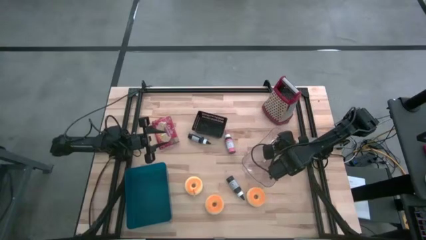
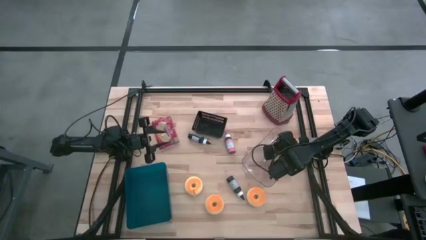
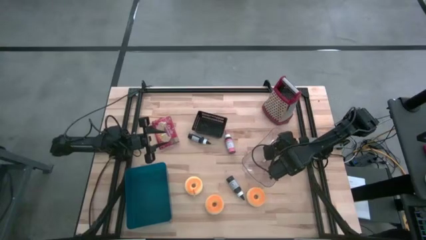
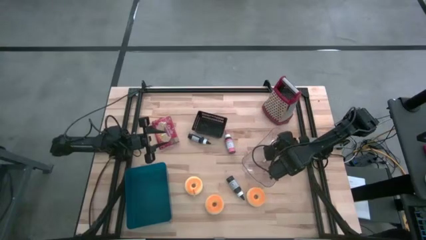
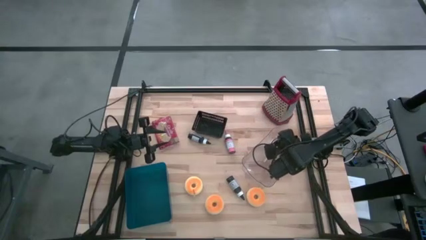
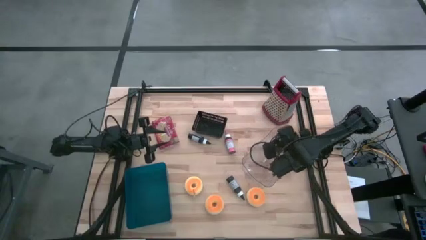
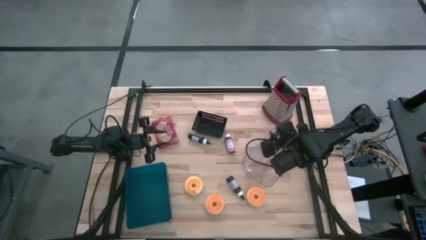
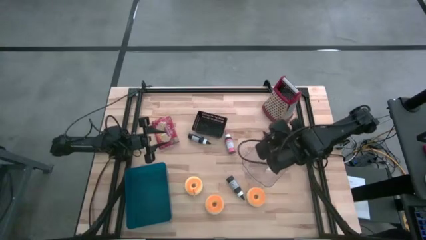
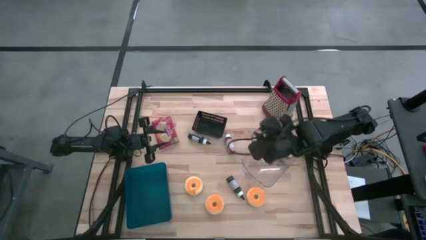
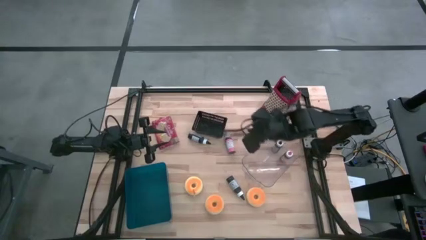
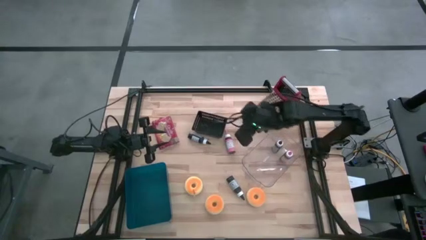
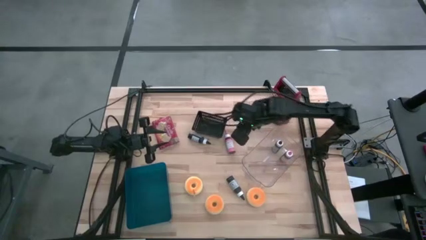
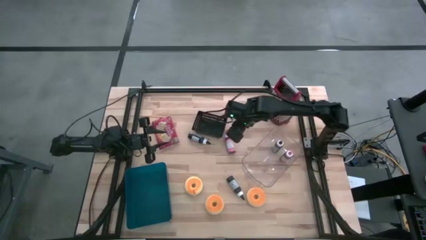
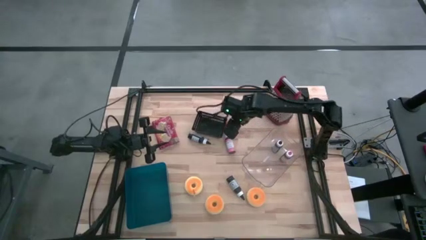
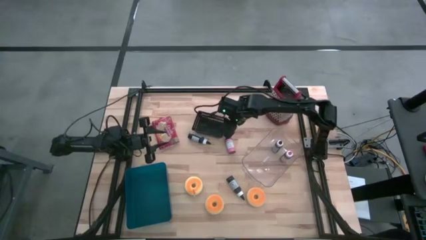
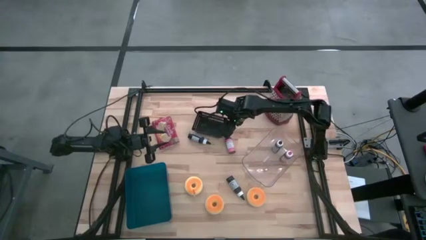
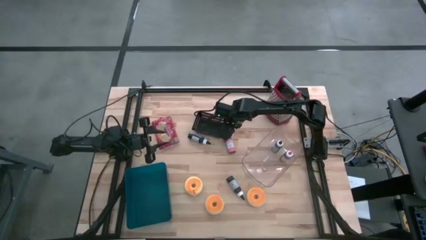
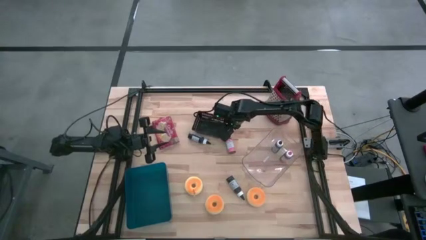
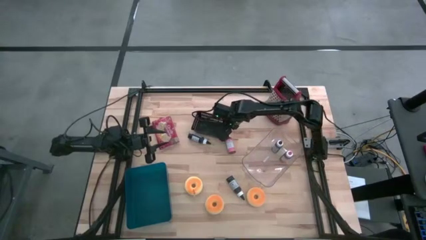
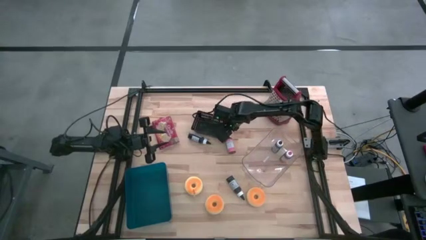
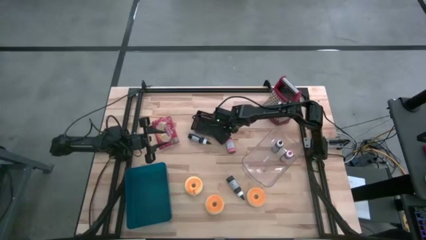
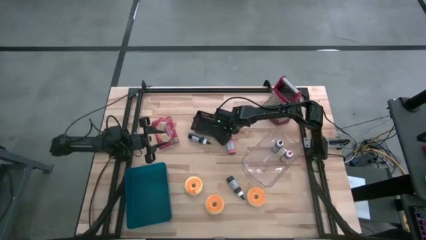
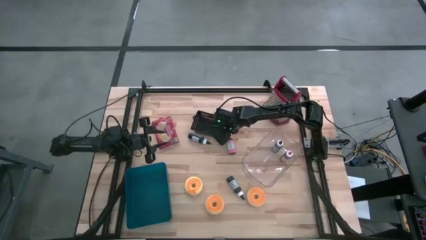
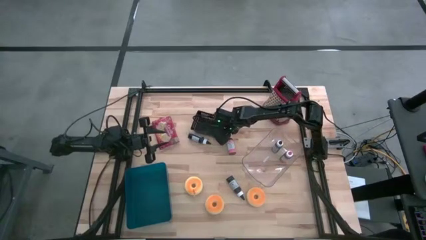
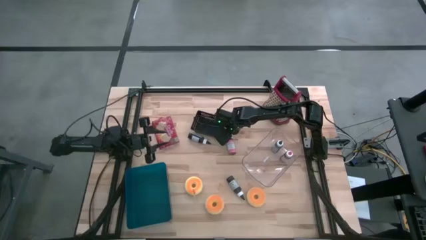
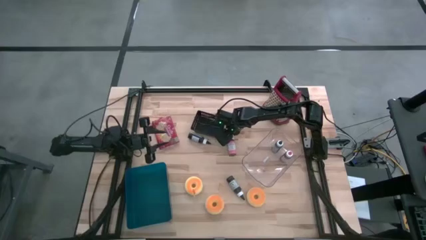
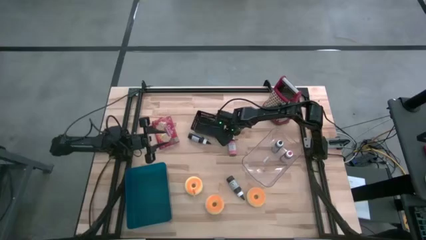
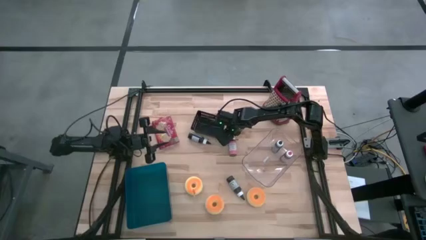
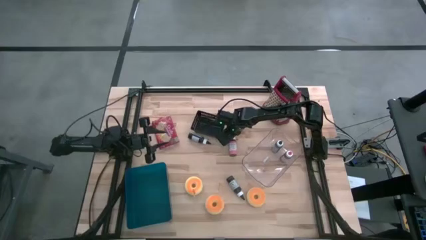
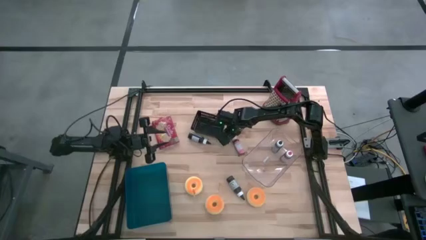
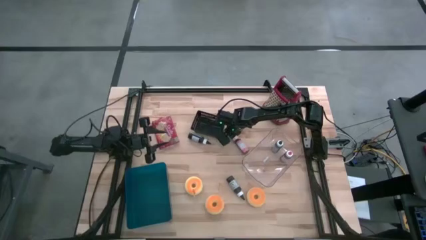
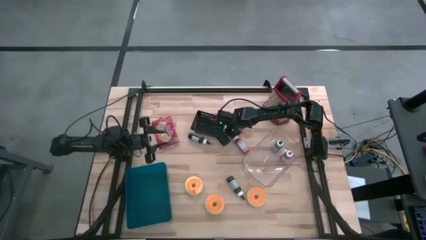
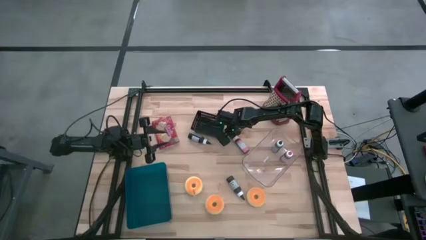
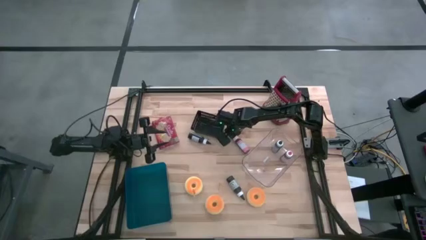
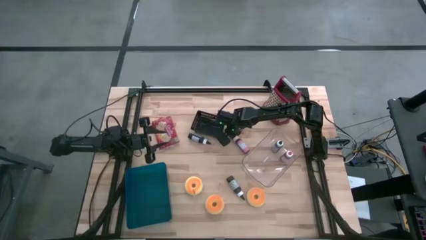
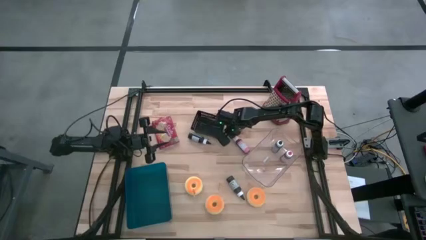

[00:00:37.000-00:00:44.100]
Task: Pick & Place Food Item
Put the pink food coloring bottle into the transparent bin

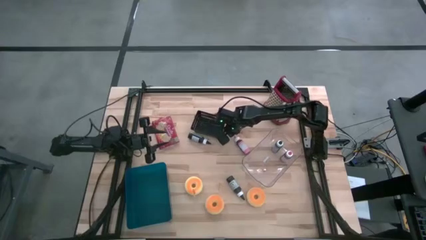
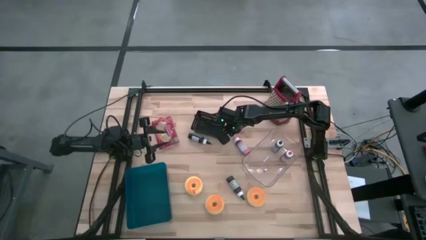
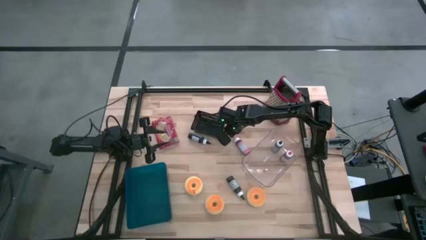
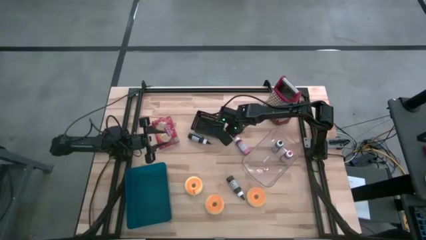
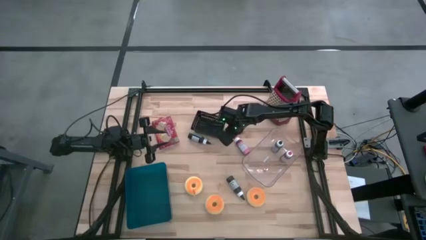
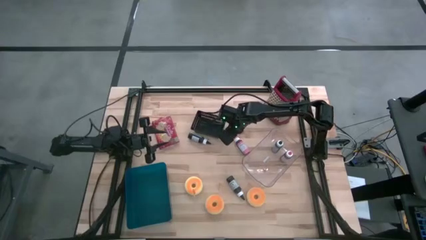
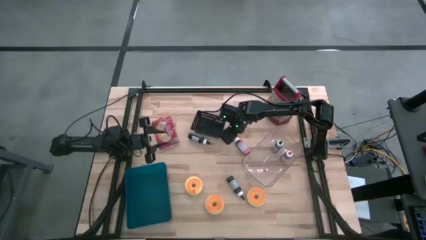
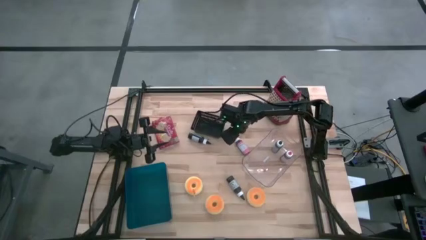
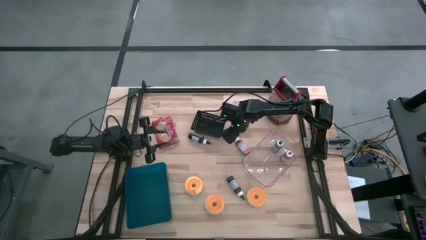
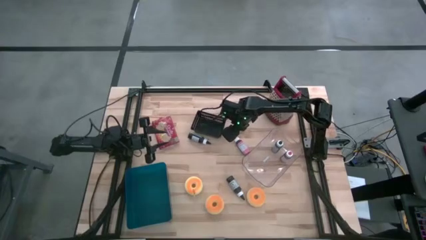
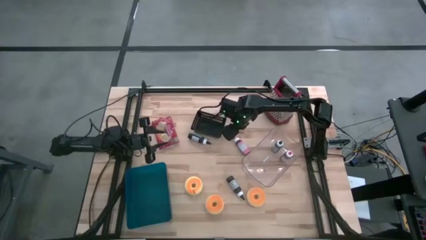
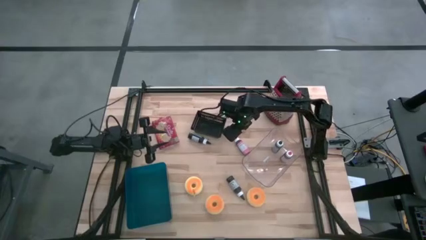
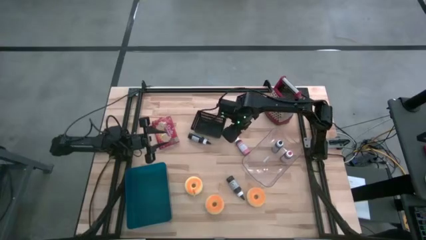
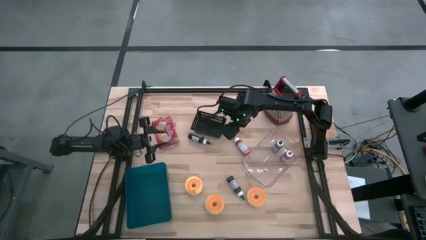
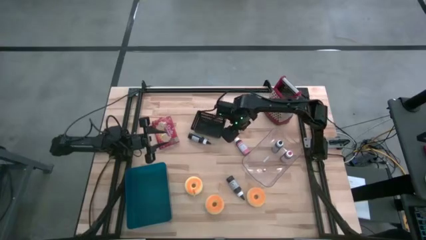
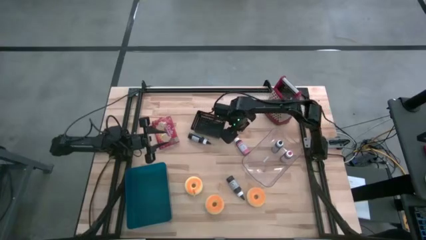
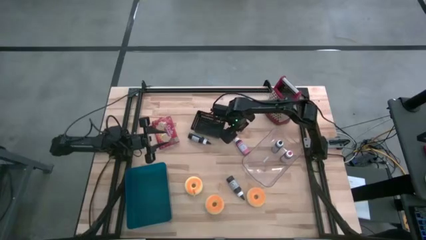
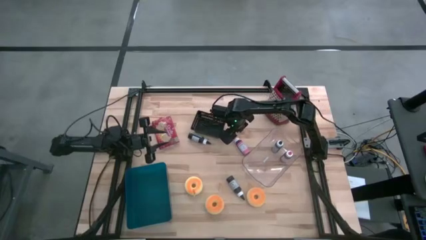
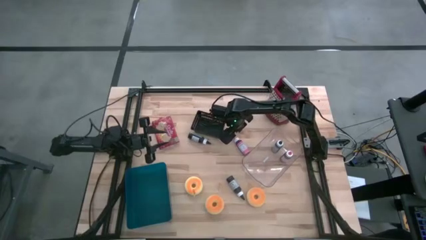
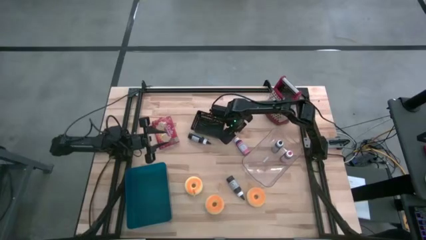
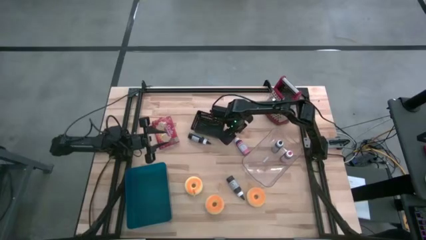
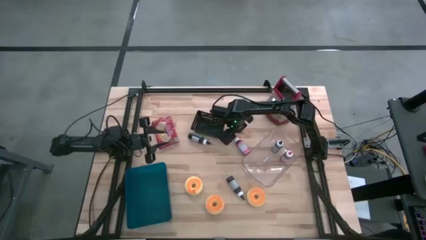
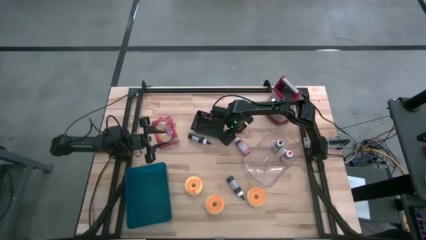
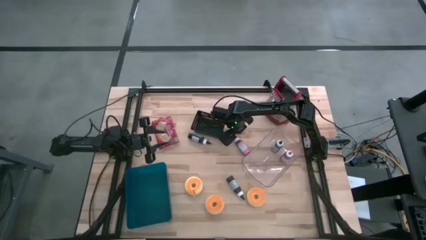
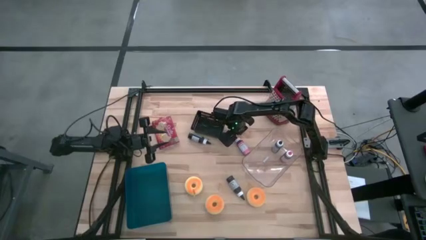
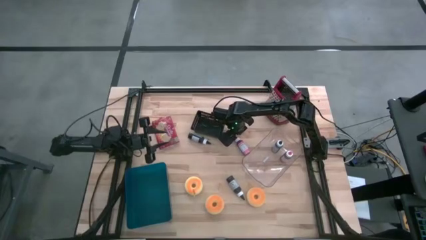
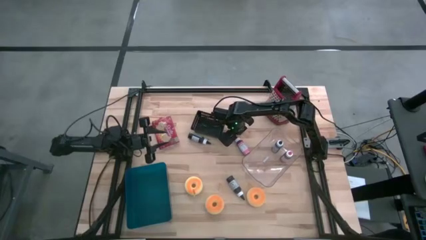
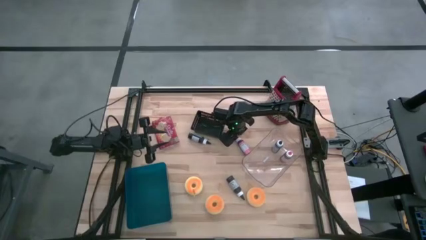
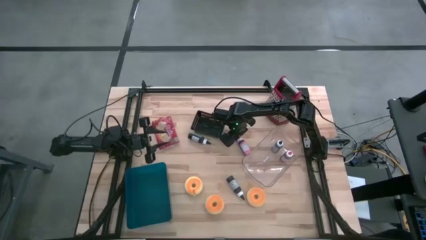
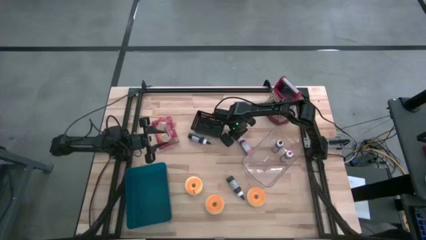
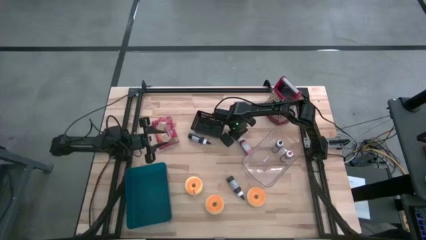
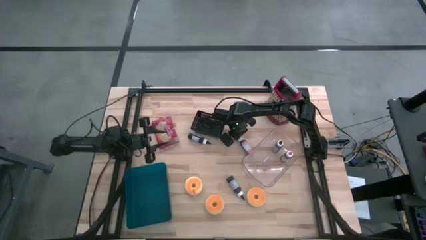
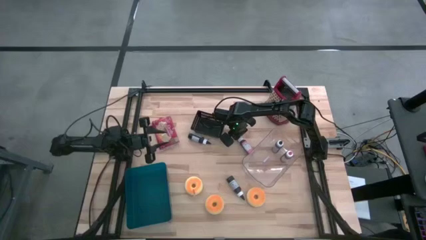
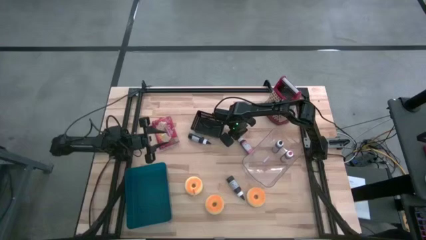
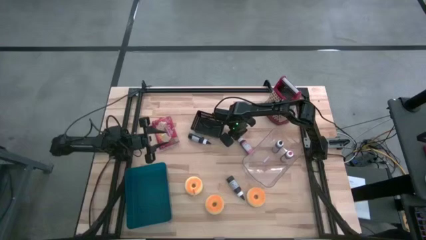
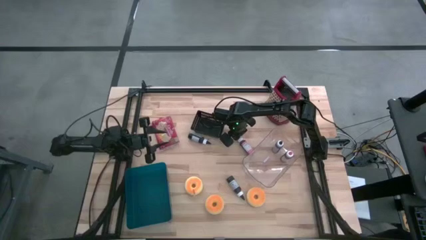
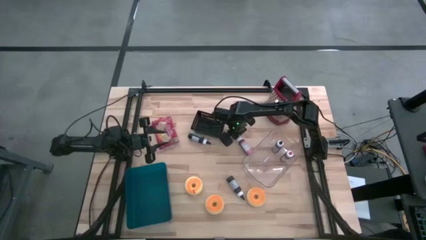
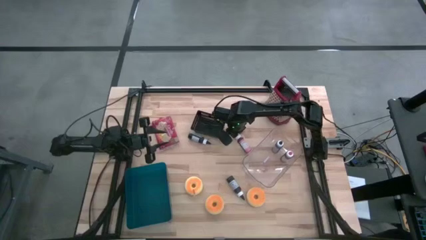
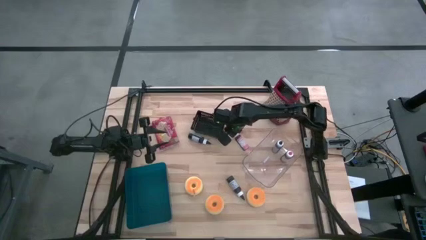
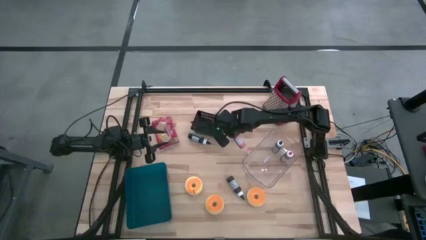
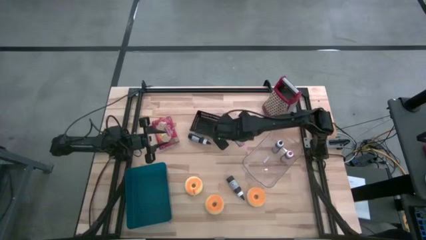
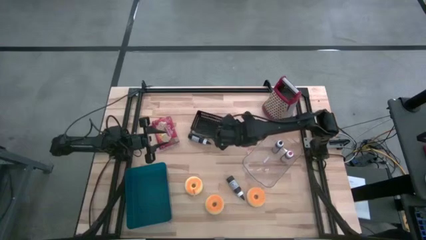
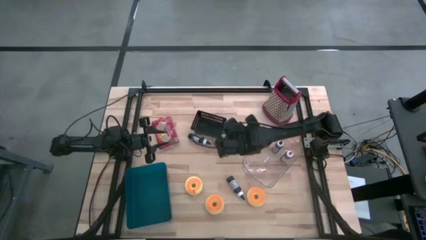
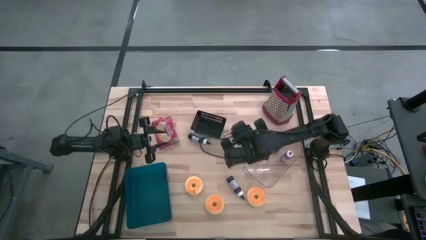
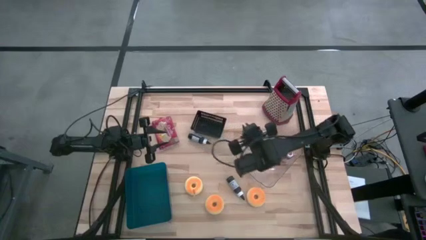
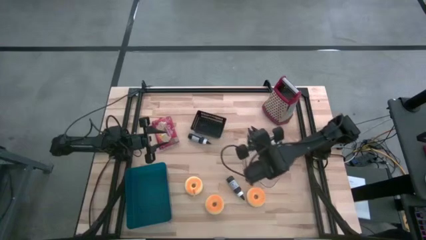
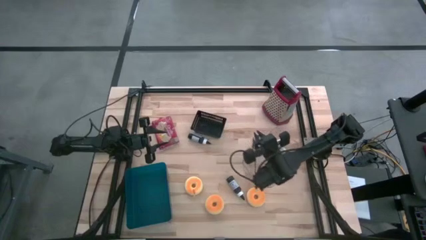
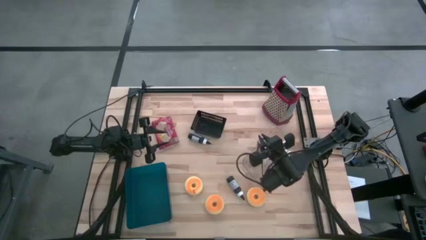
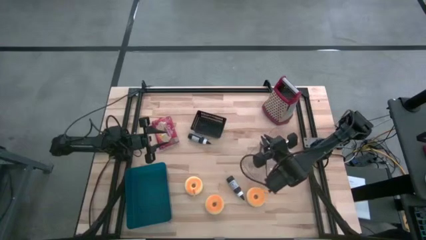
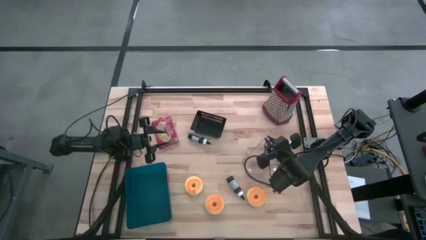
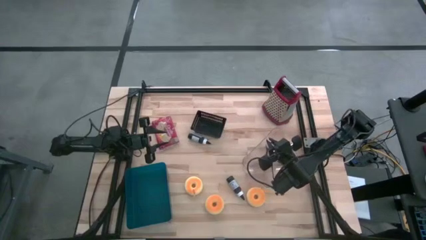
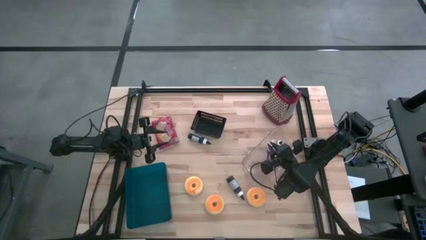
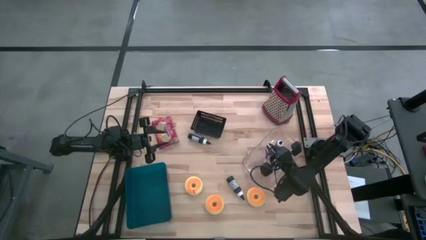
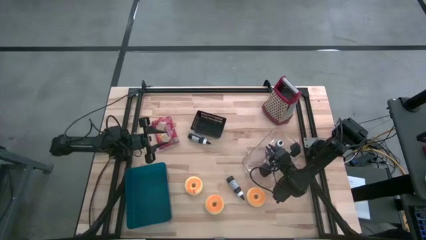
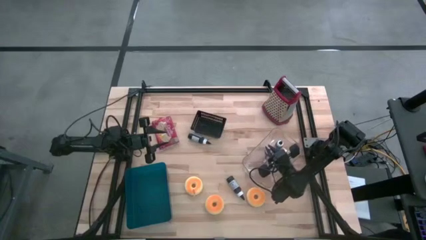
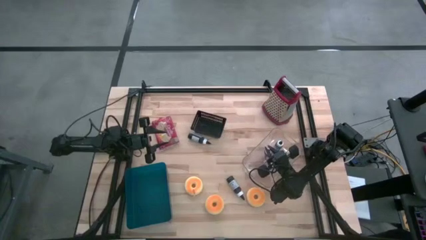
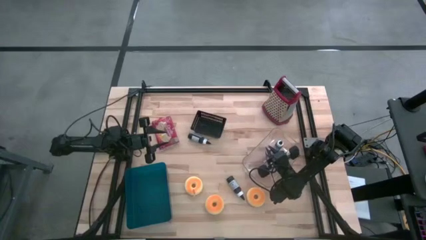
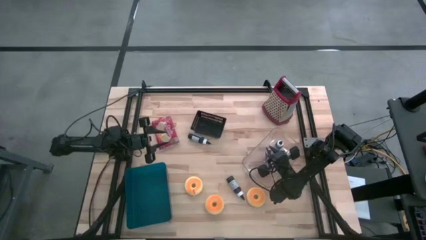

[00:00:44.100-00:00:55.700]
Put the pink food coloring bottle into the transparent bin
